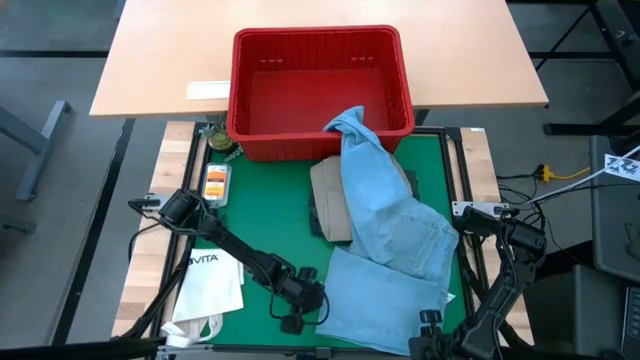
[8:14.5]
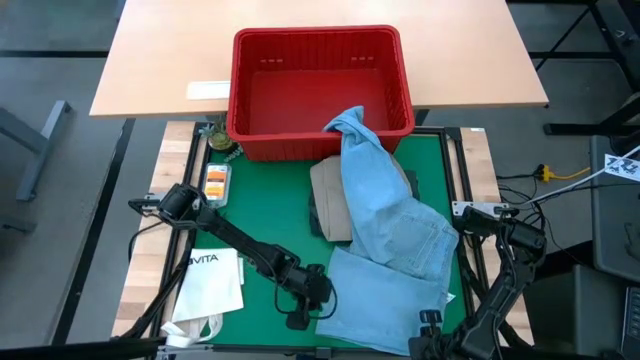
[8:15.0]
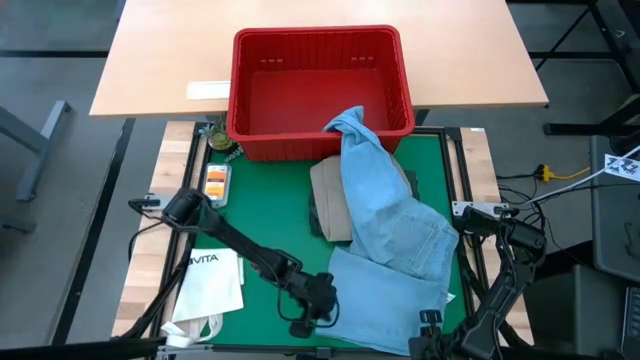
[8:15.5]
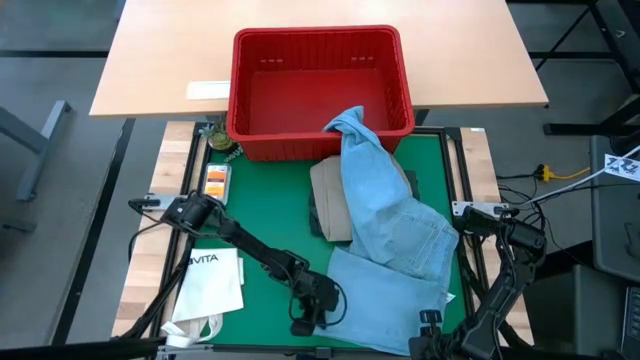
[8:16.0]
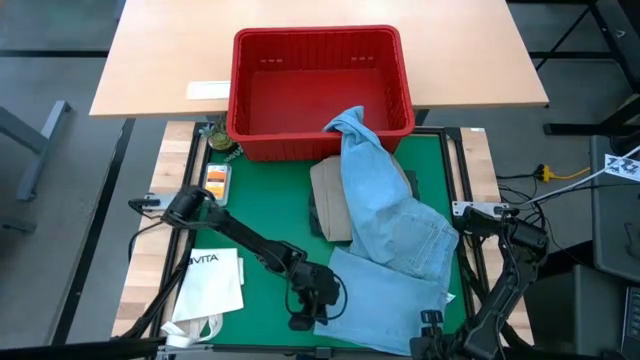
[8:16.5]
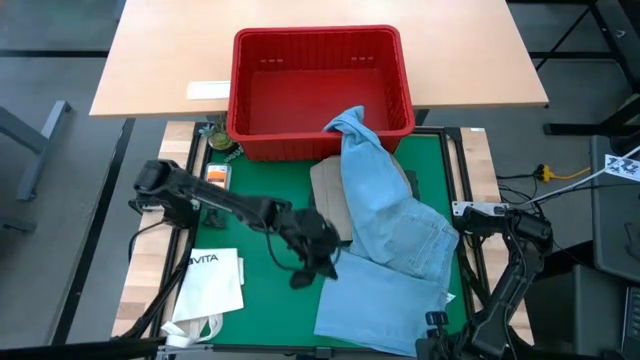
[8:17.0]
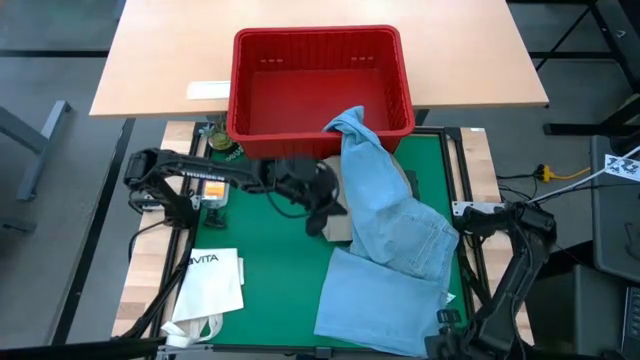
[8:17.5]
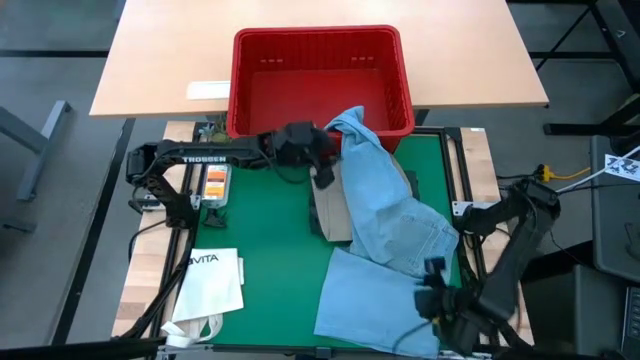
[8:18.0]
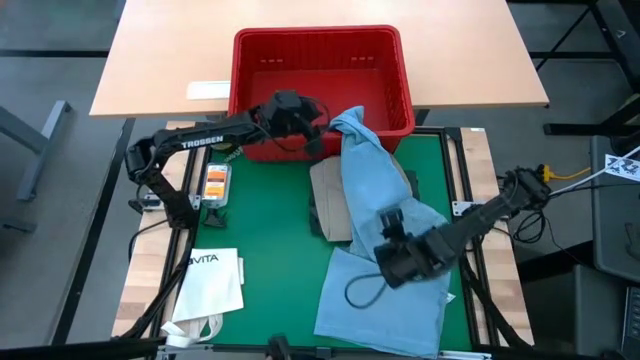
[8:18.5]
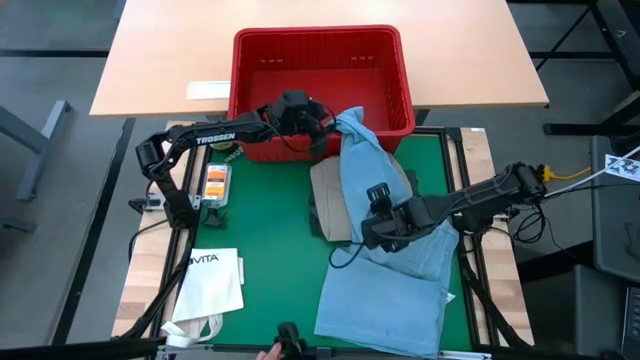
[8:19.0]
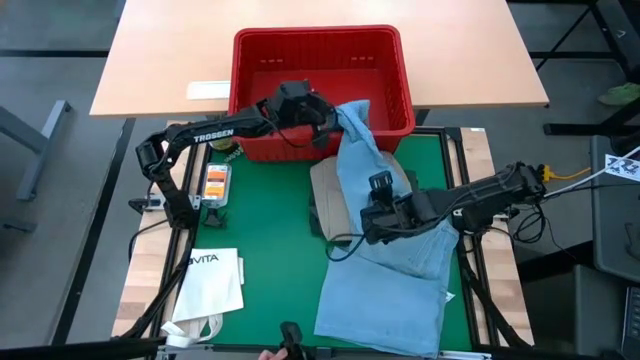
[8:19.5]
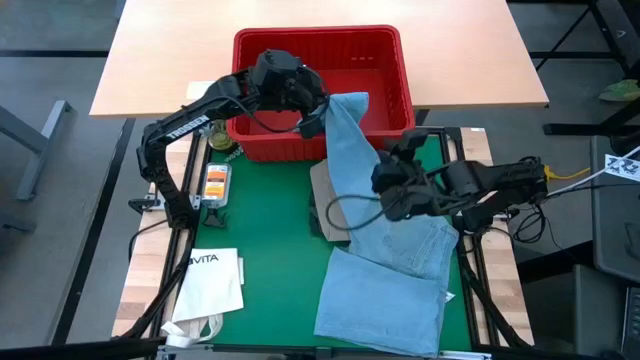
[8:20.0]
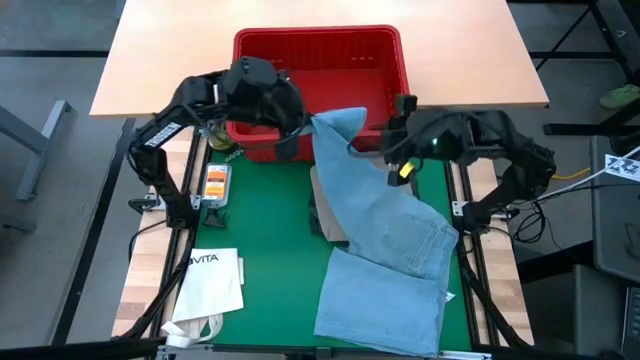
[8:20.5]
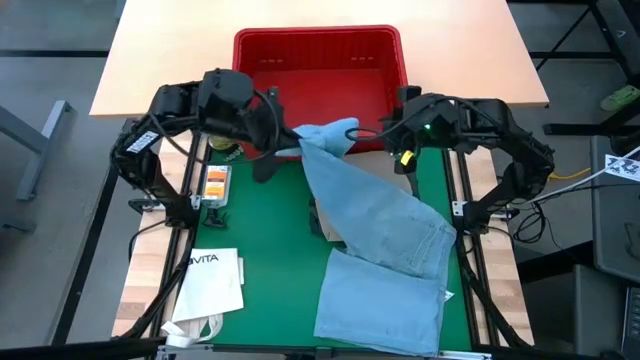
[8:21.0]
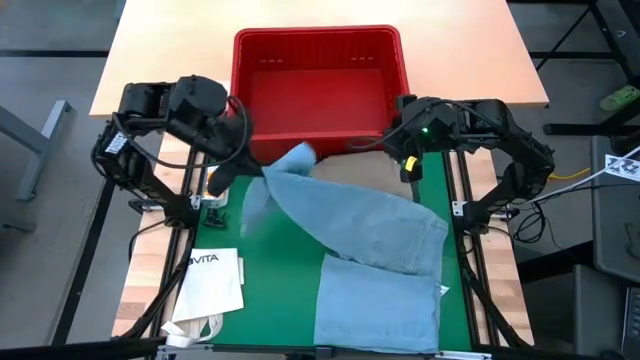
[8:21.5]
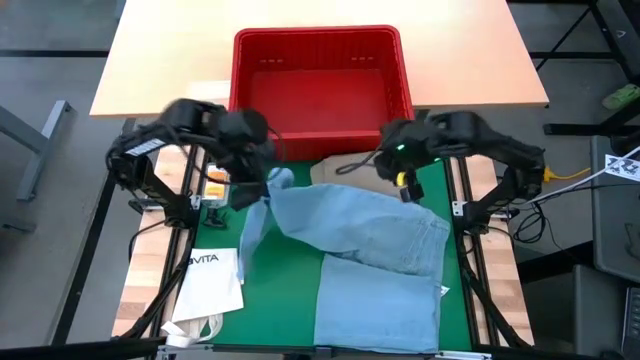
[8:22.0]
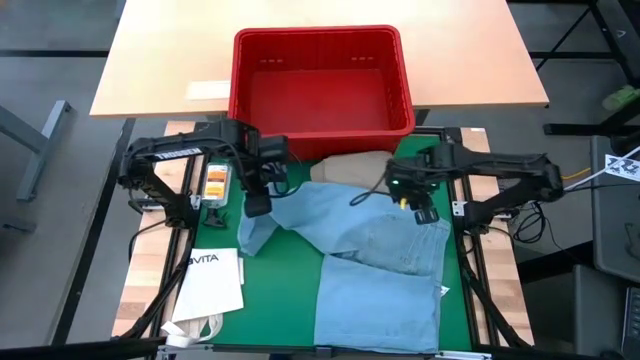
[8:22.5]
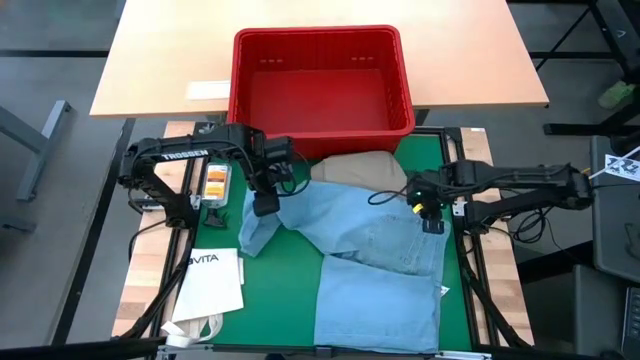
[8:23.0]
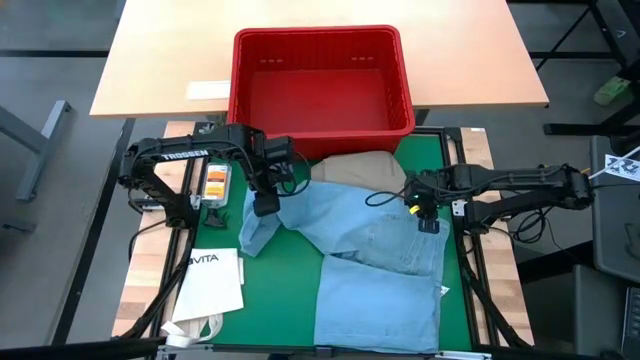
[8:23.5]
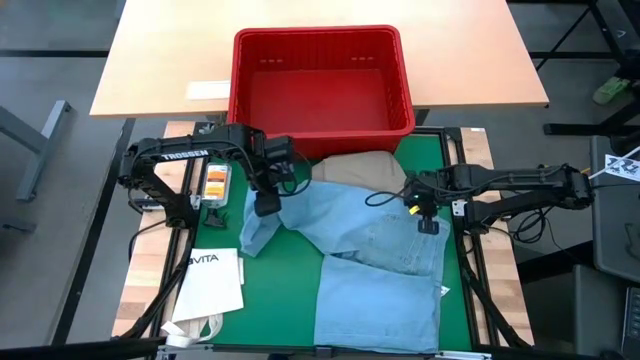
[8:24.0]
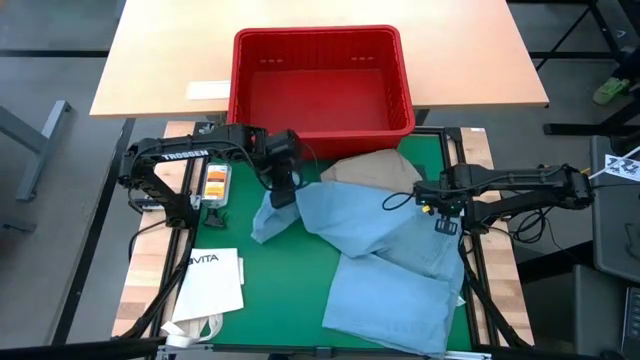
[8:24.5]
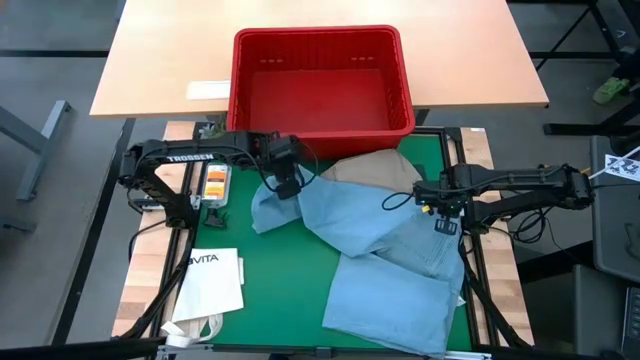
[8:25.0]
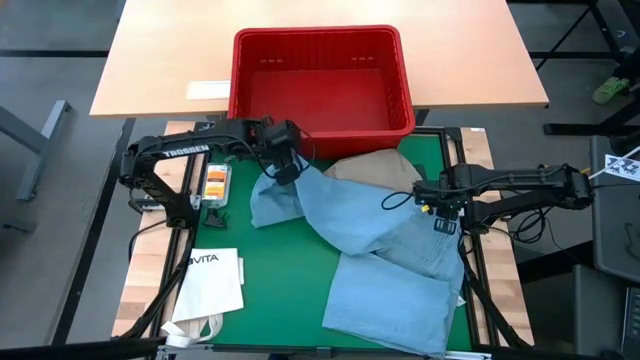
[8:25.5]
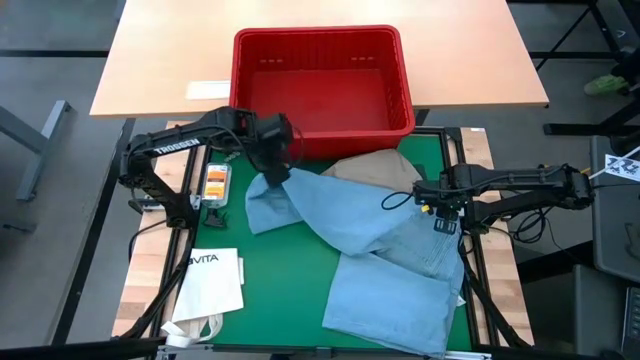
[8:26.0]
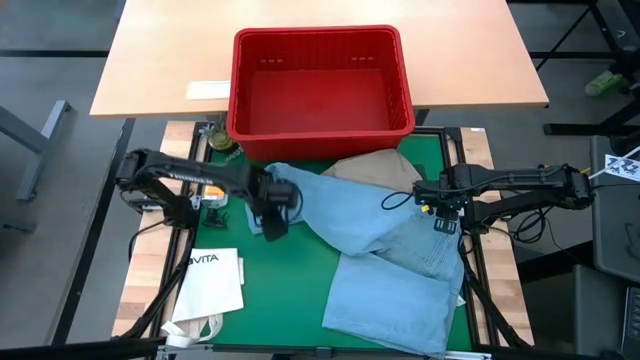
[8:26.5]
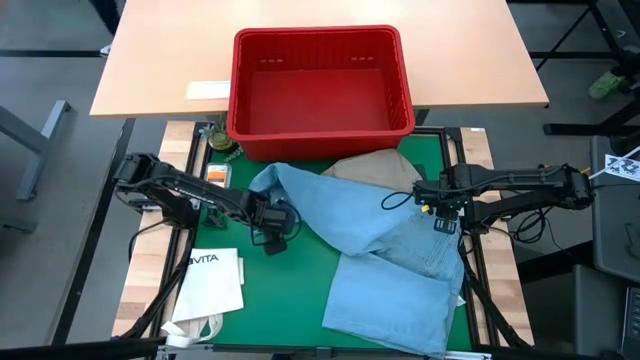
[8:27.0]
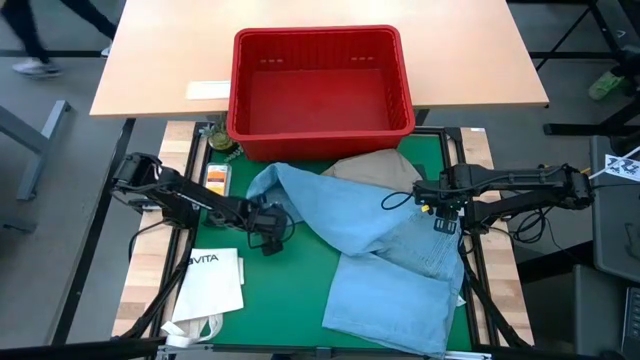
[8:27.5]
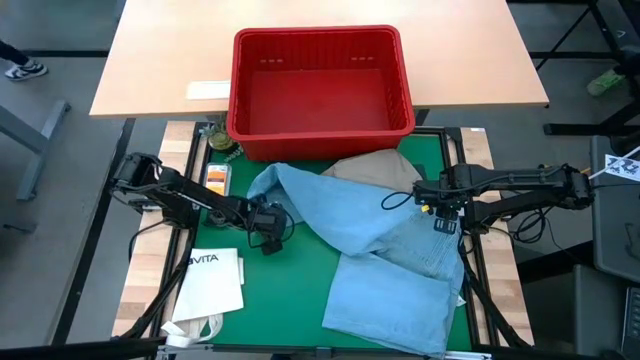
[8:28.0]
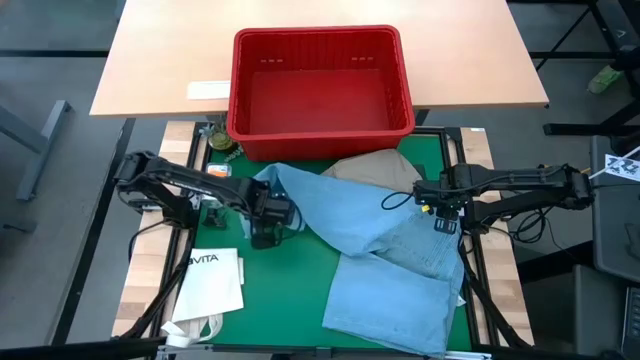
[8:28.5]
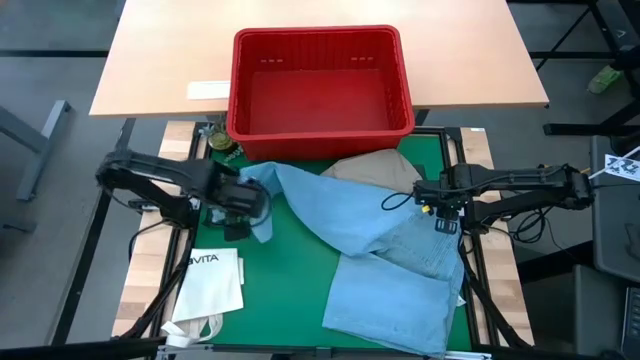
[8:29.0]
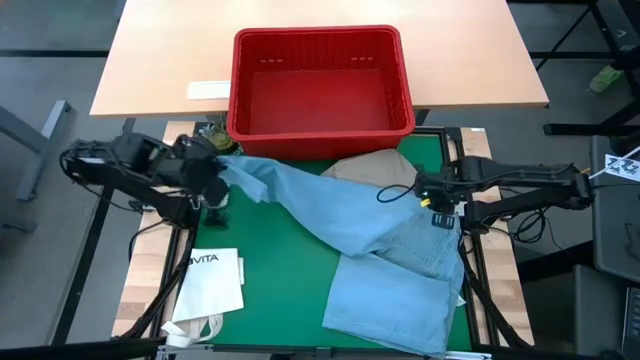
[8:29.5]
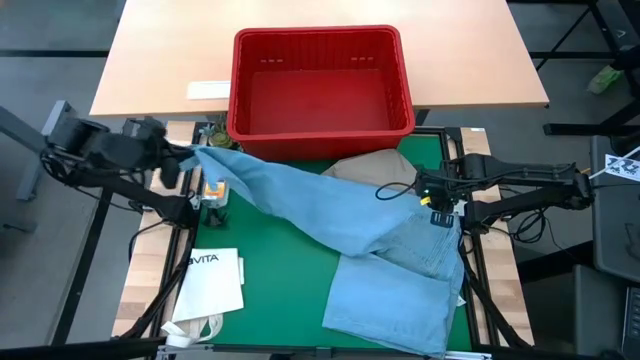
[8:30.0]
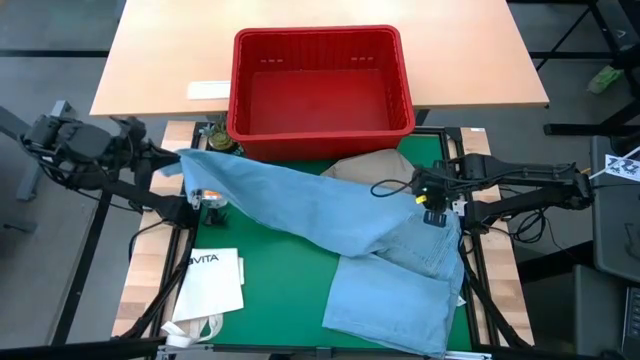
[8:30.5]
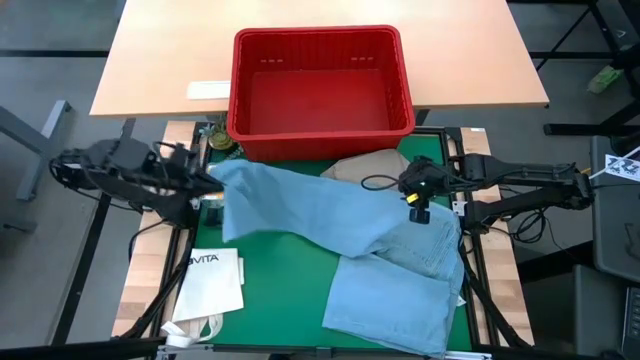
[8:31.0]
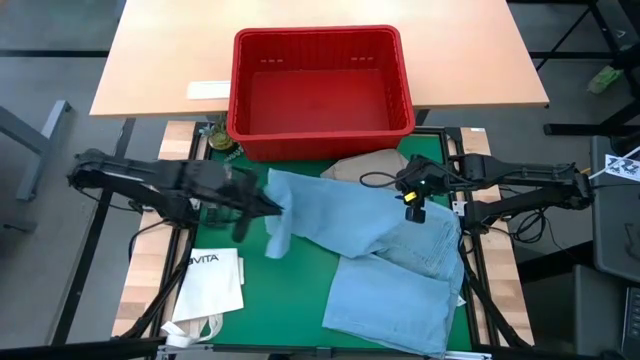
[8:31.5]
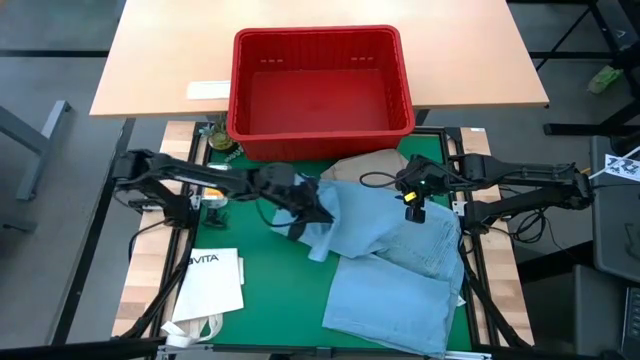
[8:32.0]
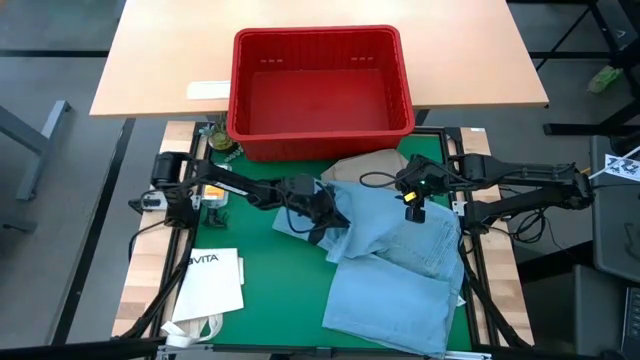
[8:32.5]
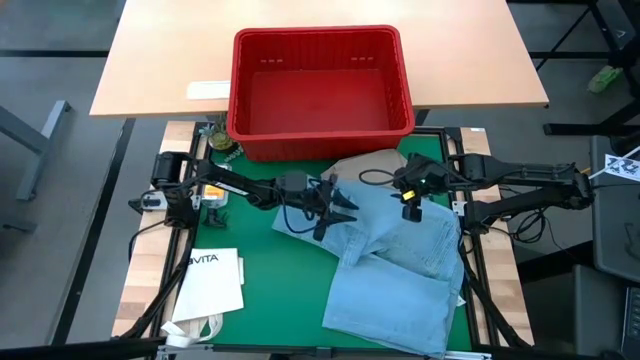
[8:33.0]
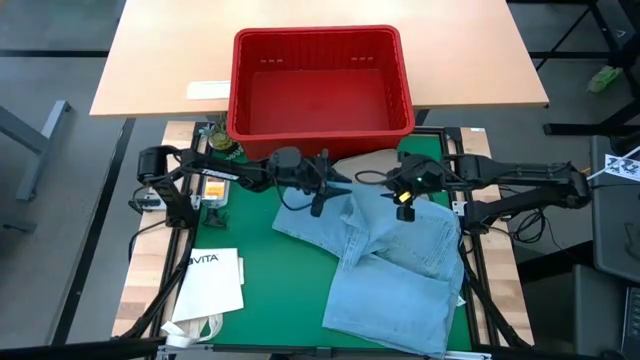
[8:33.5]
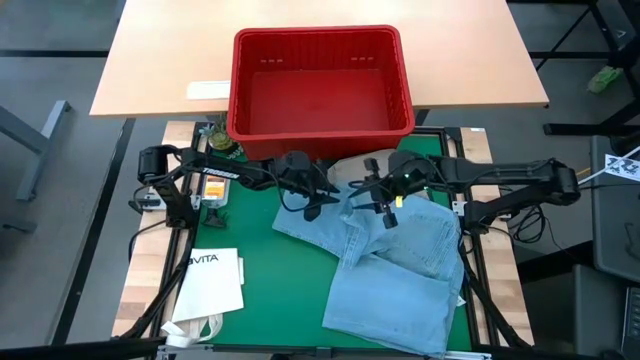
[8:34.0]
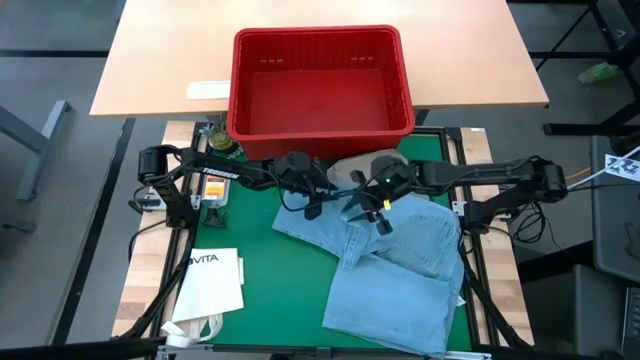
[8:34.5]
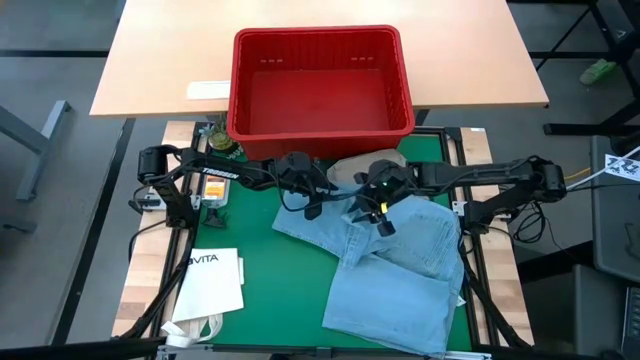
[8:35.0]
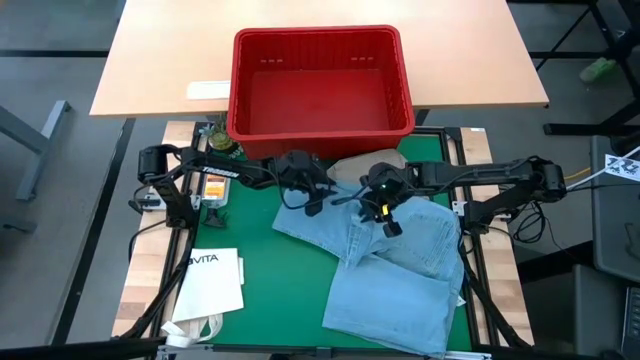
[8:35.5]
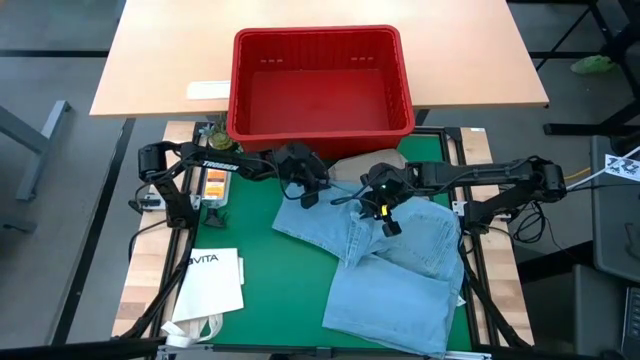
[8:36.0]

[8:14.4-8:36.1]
Task: Fold Laundry from Bin
Fold the light blue pants
